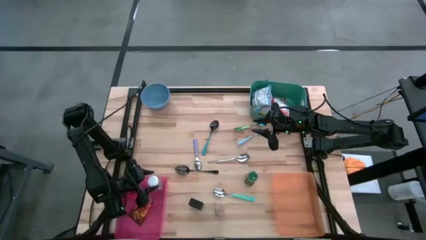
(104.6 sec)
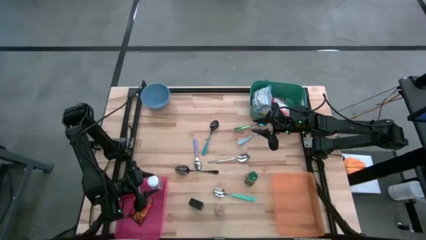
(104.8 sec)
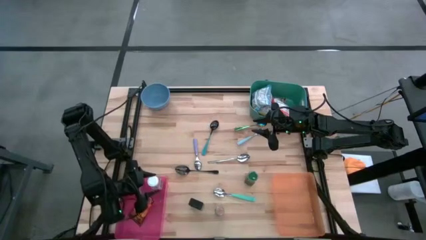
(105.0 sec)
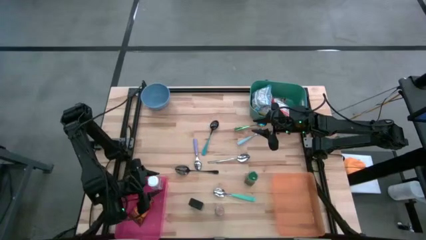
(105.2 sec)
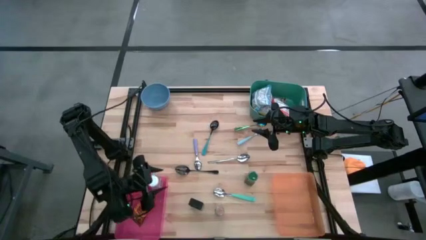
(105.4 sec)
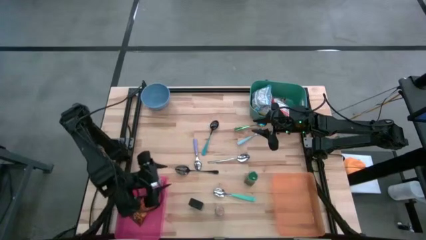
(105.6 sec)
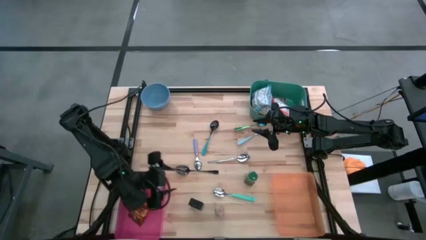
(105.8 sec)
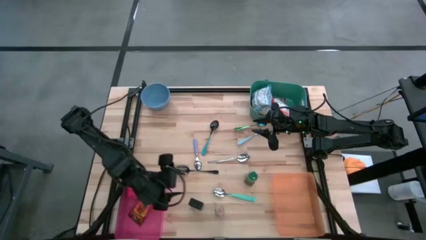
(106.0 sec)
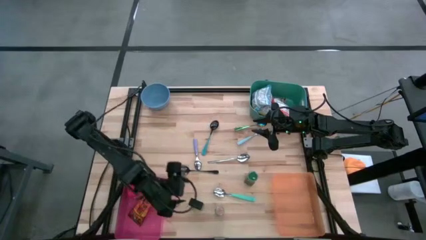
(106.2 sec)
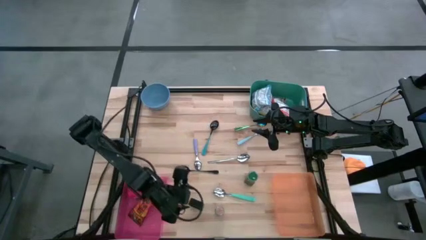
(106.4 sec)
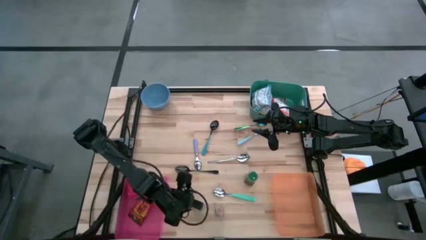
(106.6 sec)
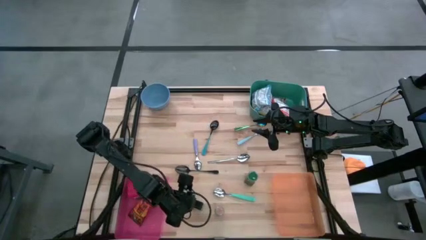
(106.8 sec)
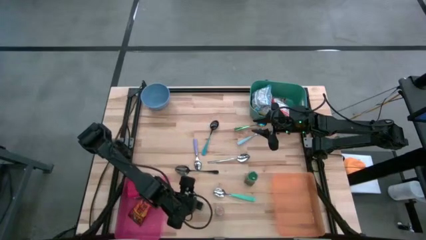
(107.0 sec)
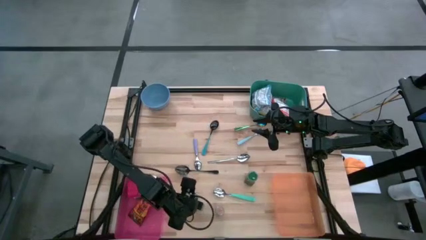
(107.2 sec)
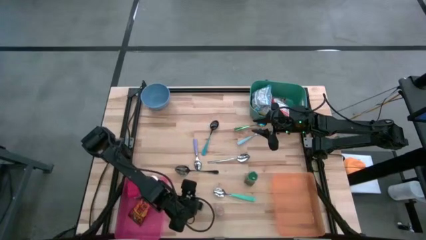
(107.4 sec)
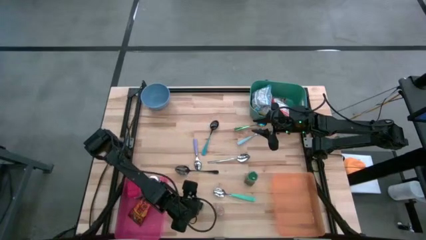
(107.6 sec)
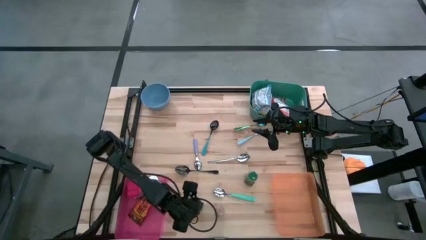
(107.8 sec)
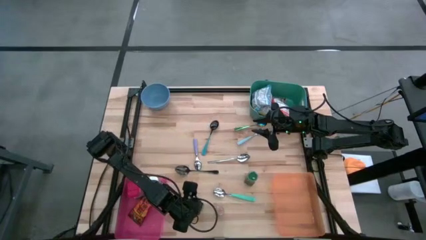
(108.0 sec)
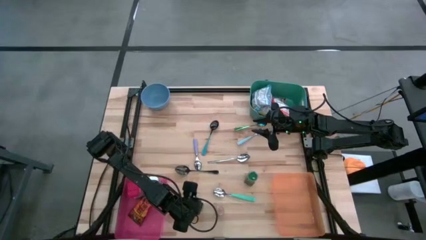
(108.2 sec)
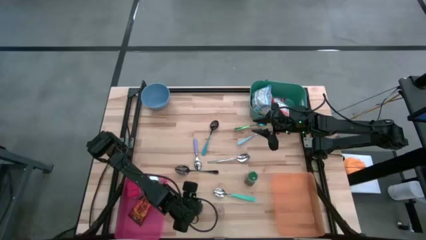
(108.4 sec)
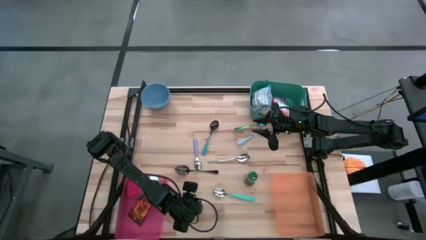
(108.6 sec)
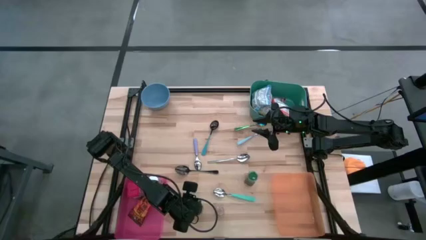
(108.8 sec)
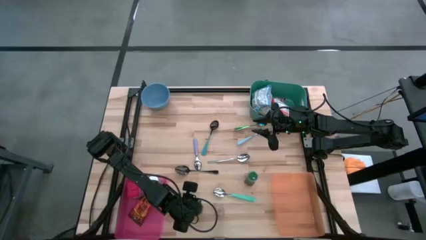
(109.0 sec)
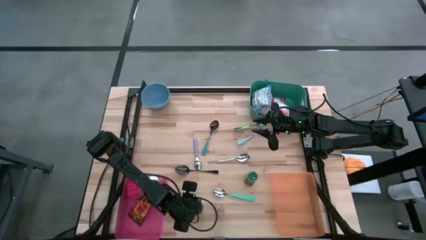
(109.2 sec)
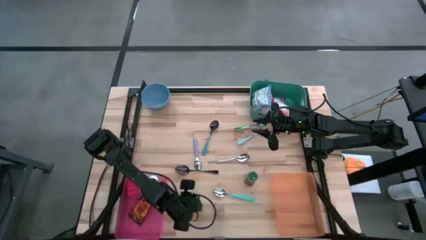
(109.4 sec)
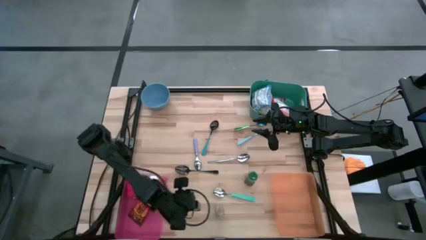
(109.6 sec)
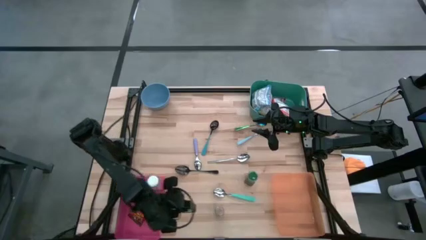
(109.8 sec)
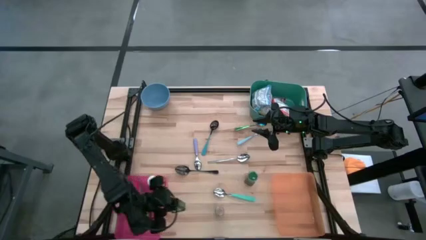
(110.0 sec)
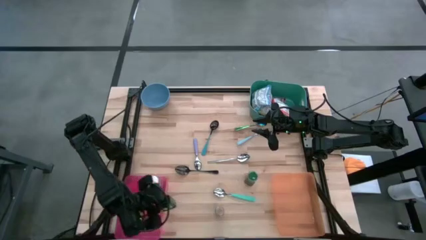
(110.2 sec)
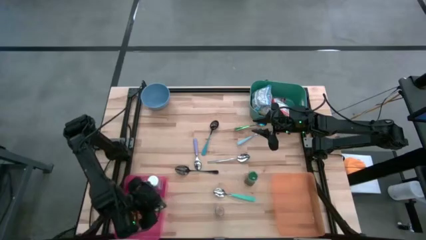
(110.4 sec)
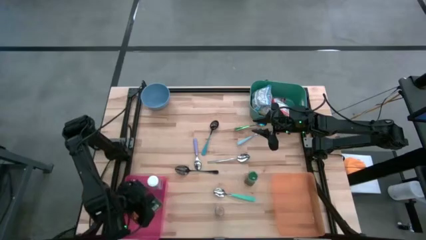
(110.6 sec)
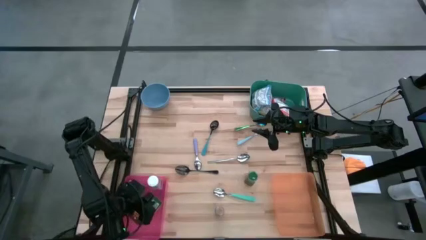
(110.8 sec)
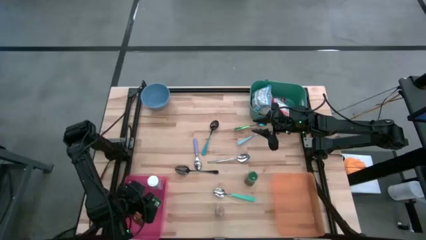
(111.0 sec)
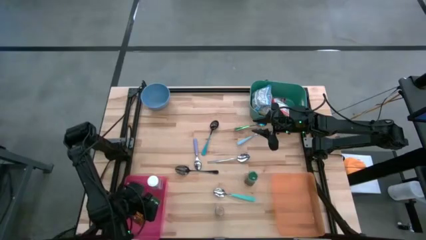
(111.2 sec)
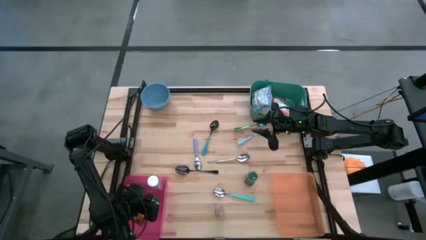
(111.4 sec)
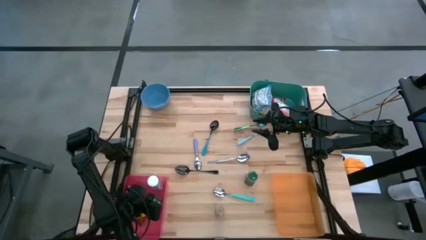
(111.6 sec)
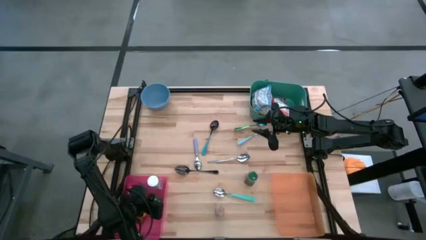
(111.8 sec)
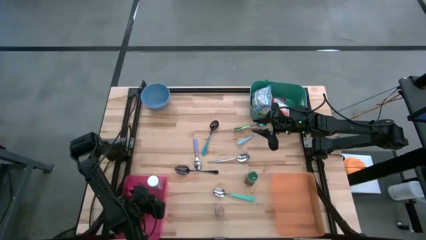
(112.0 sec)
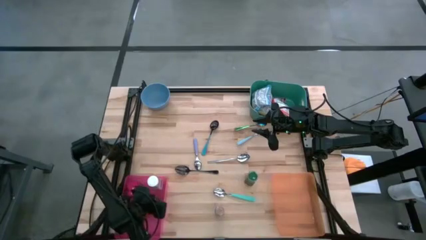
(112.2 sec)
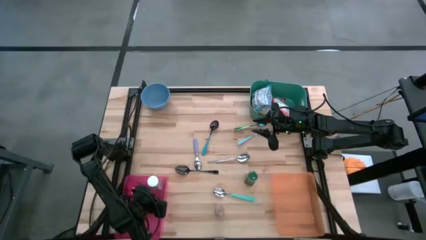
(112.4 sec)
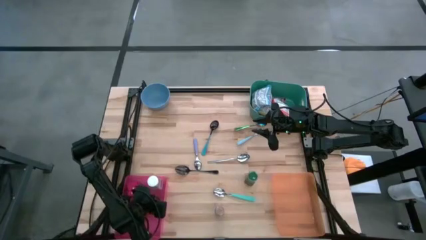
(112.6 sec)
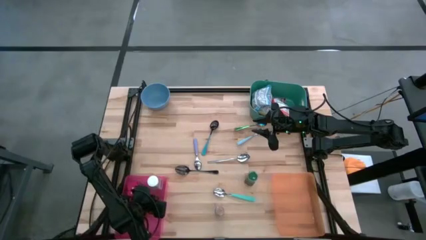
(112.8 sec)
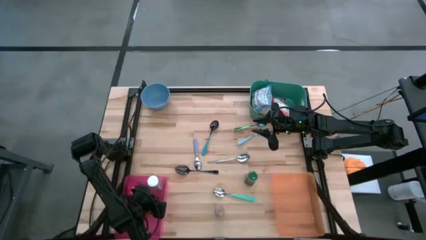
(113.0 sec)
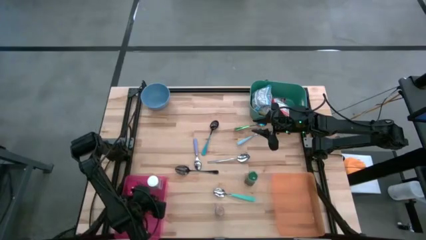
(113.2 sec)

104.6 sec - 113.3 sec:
Put the black seasoning can into the pink bin

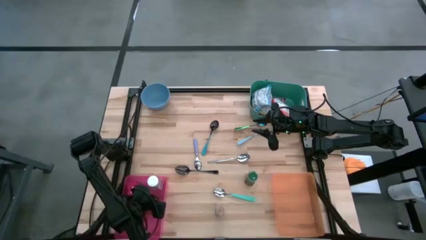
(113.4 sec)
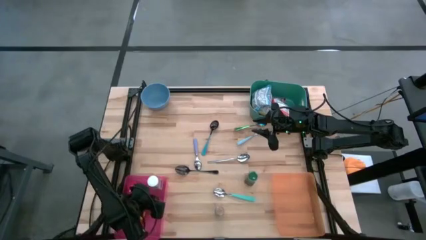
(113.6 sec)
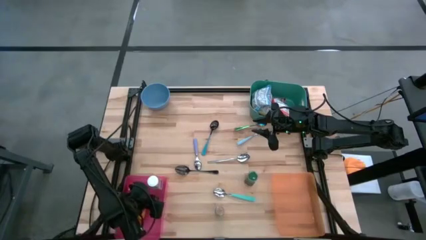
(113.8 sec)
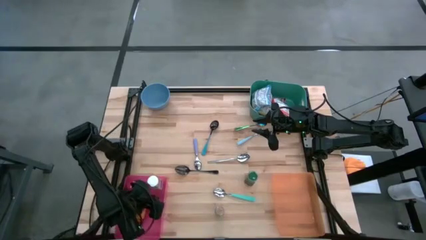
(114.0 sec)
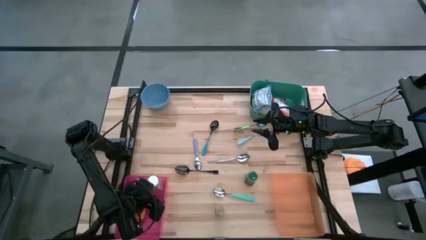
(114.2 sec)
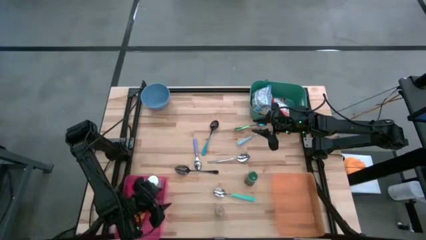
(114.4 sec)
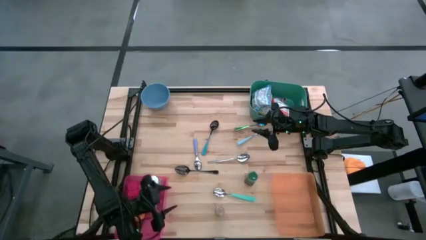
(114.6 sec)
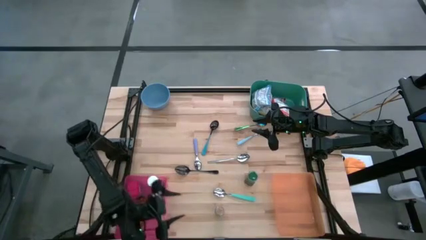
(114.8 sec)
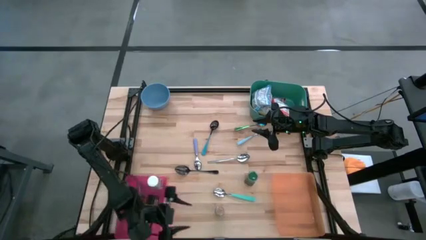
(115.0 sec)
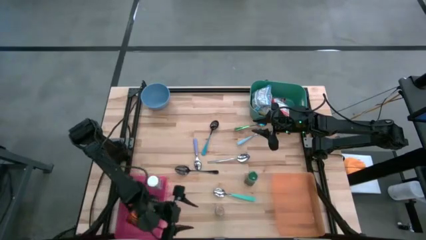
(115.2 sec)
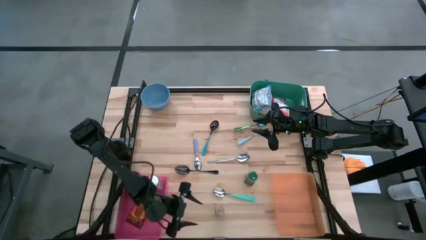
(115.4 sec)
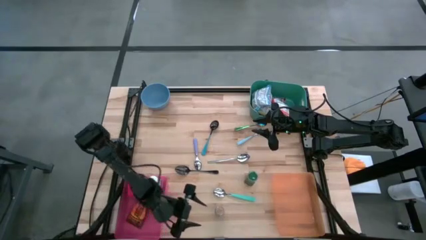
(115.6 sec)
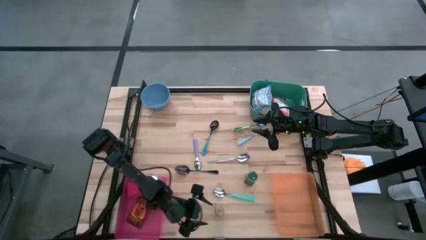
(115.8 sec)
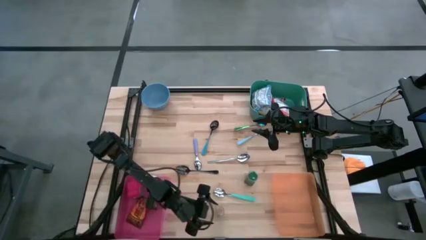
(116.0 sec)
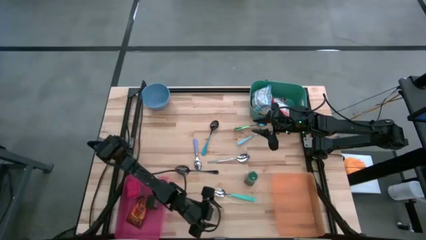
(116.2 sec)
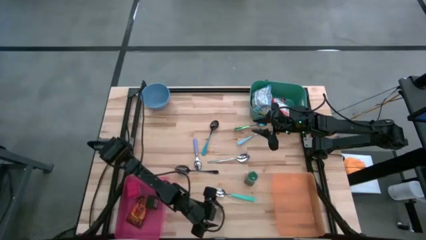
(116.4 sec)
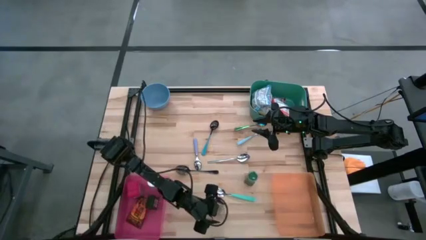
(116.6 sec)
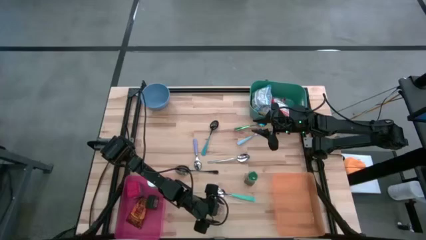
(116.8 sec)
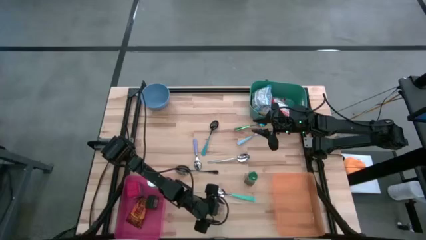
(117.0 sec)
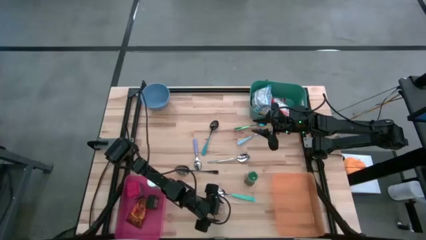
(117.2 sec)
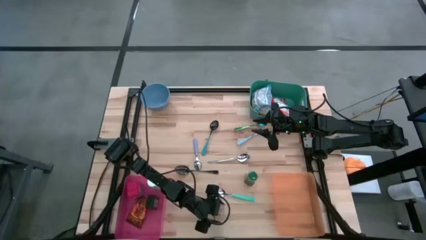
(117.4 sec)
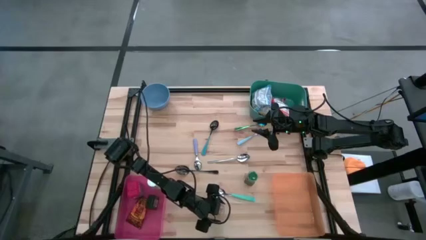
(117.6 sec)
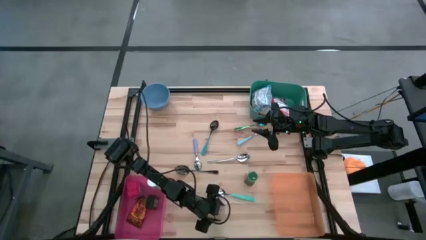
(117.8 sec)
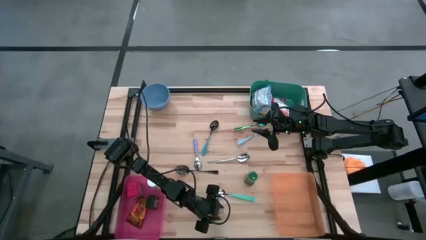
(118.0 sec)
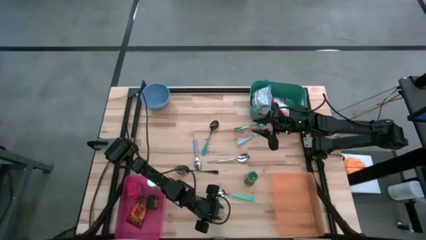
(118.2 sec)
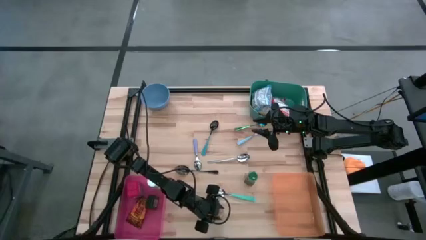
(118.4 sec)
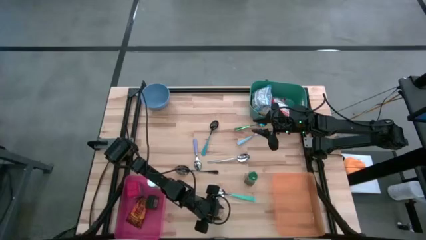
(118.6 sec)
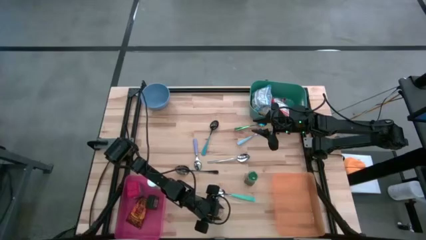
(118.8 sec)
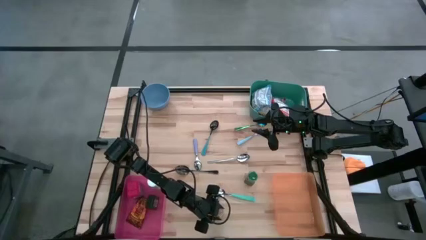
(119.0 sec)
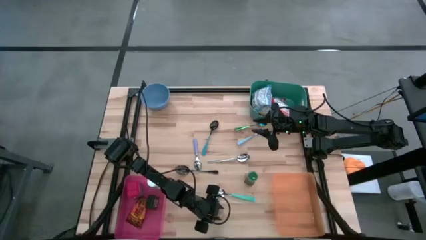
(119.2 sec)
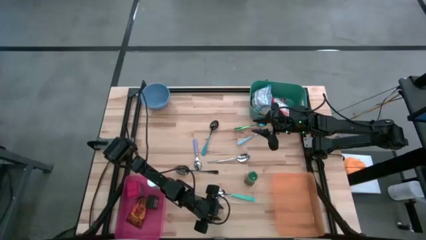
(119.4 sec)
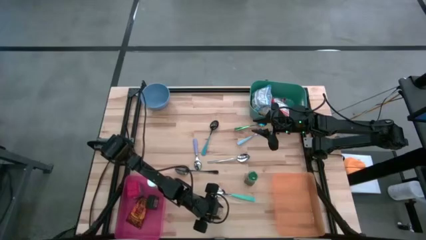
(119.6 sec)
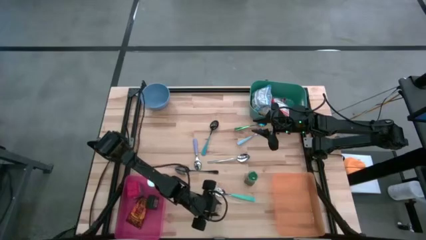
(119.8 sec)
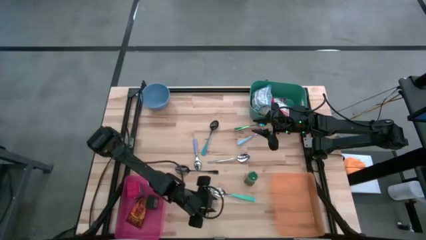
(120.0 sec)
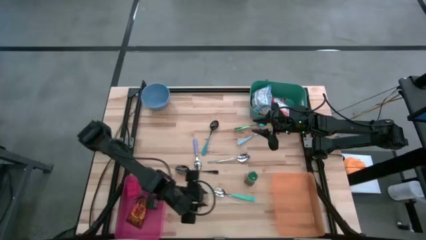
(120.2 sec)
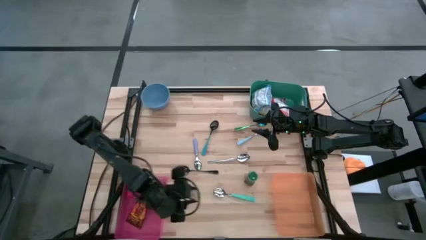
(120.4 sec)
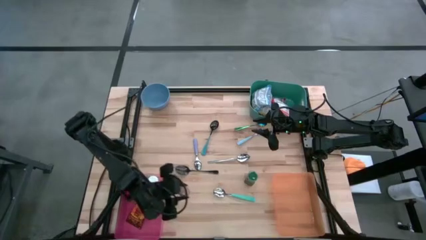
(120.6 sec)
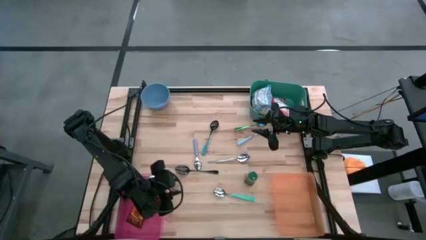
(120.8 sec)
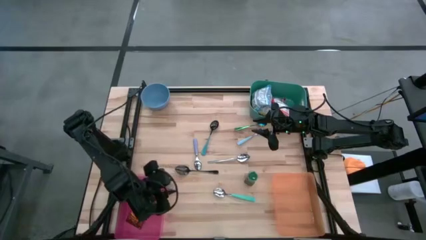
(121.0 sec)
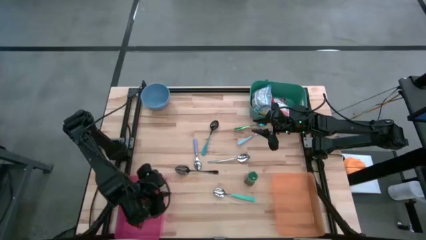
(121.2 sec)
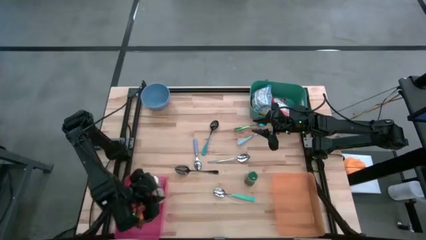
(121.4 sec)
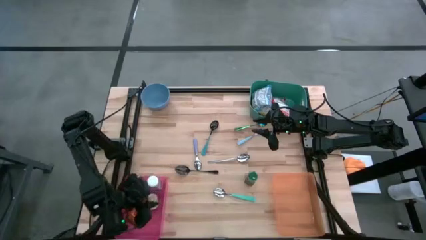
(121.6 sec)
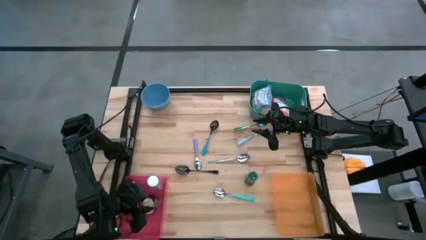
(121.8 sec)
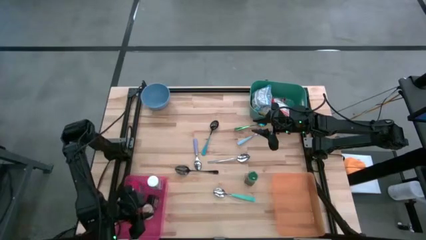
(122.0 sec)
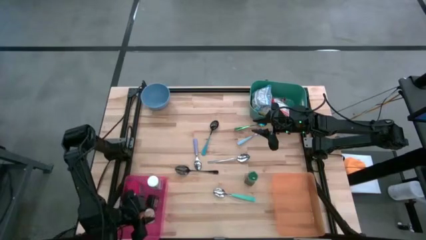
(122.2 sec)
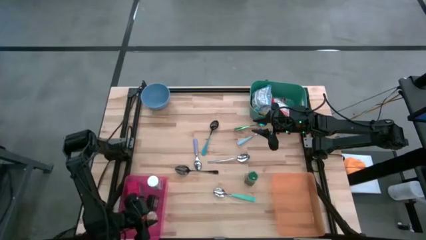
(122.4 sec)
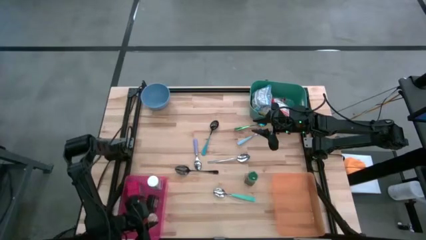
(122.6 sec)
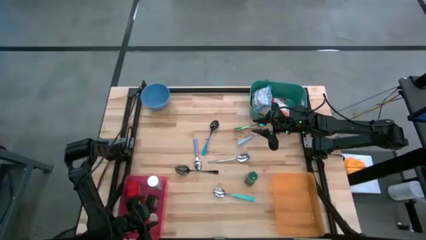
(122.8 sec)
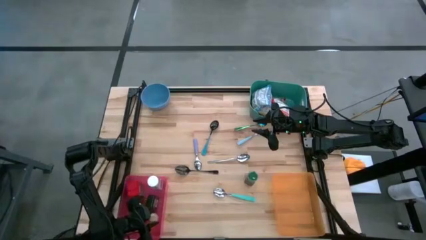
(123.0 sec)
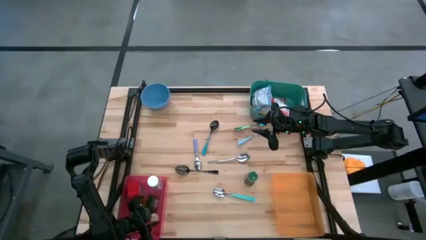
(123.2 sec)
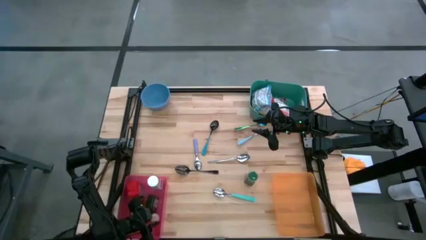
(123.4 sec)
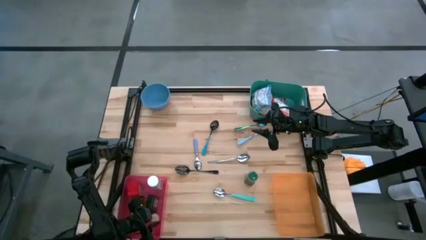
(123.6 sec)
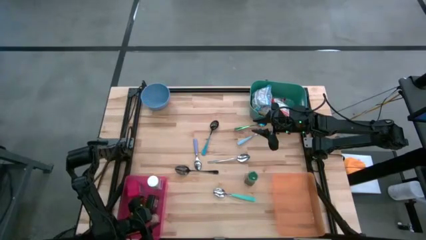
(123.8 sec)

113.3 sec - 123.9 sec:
Put the brown seasoning bottle into the pink bin
